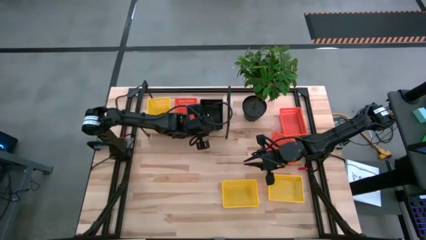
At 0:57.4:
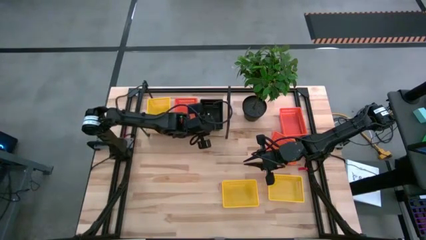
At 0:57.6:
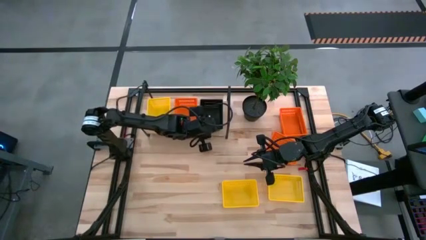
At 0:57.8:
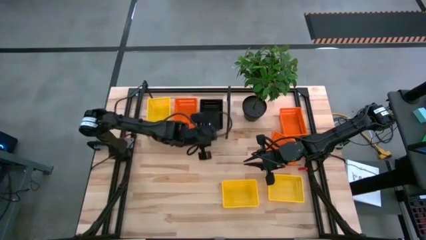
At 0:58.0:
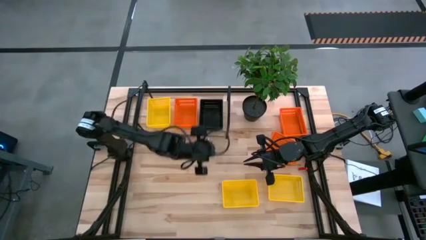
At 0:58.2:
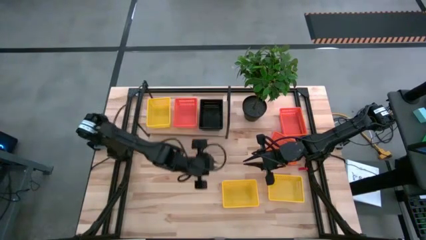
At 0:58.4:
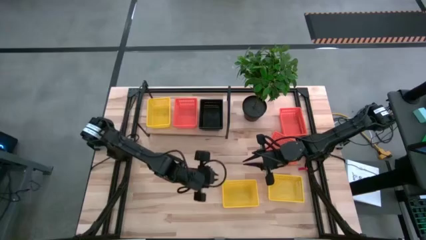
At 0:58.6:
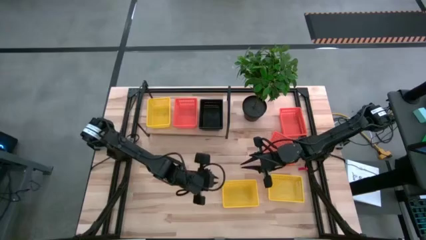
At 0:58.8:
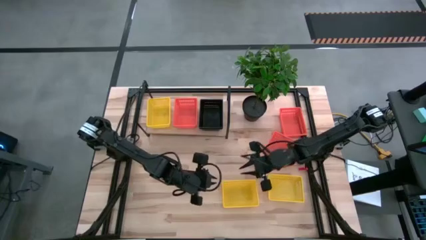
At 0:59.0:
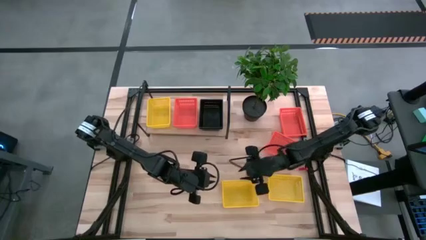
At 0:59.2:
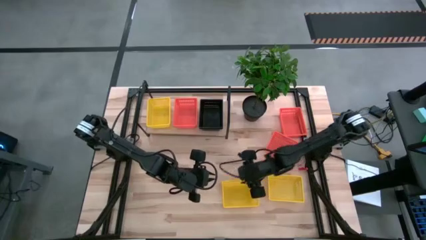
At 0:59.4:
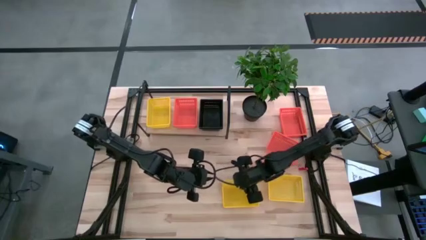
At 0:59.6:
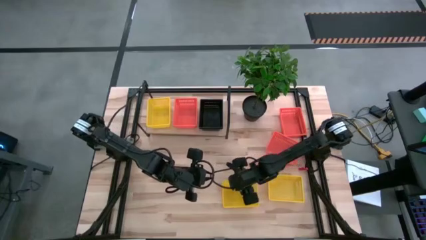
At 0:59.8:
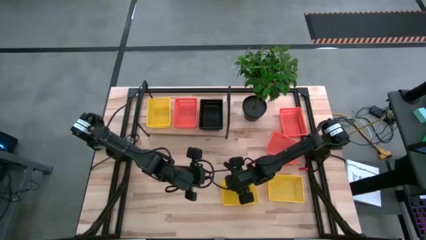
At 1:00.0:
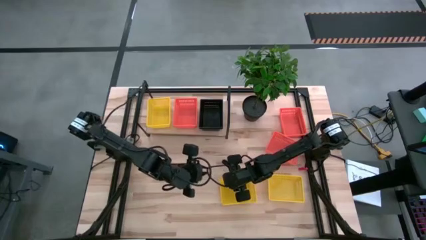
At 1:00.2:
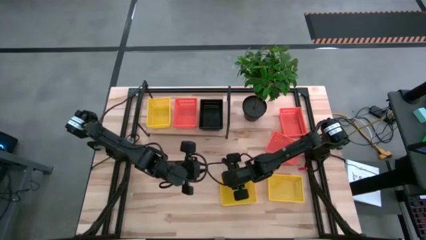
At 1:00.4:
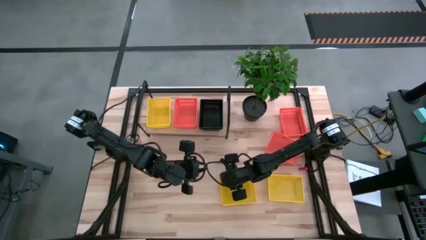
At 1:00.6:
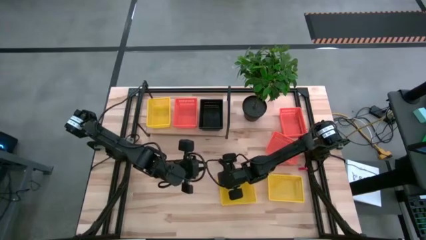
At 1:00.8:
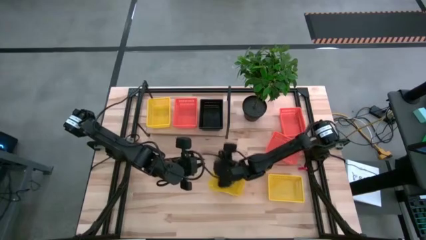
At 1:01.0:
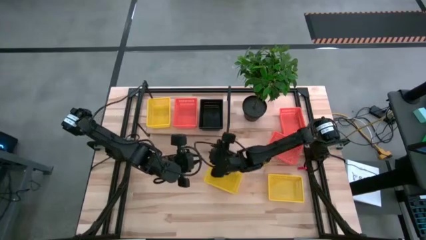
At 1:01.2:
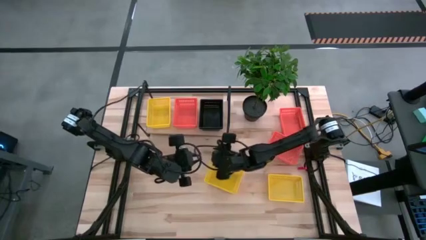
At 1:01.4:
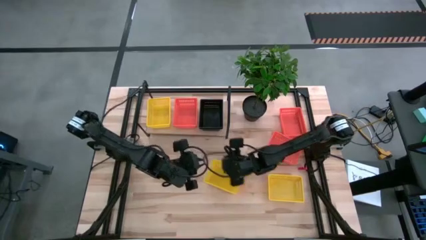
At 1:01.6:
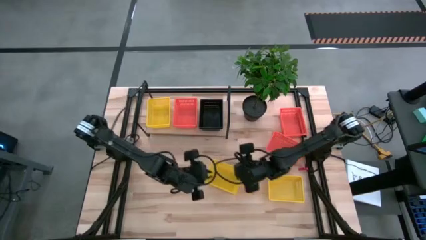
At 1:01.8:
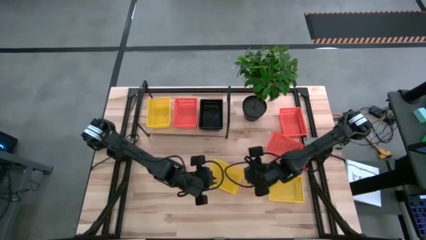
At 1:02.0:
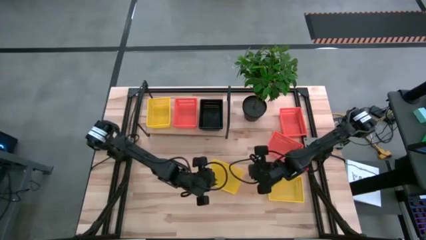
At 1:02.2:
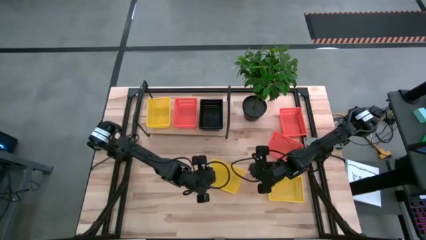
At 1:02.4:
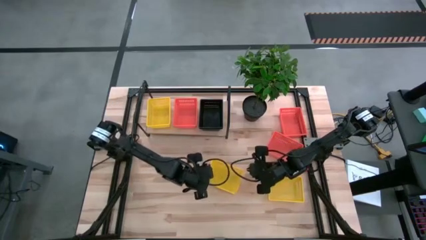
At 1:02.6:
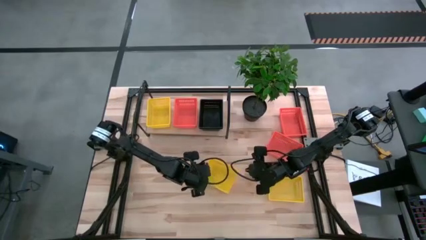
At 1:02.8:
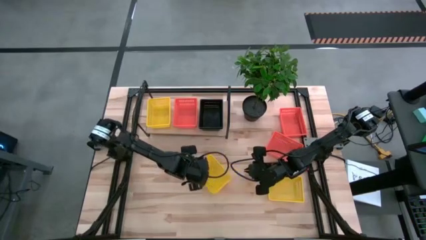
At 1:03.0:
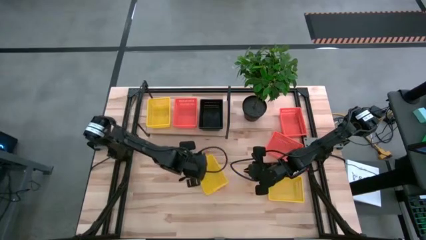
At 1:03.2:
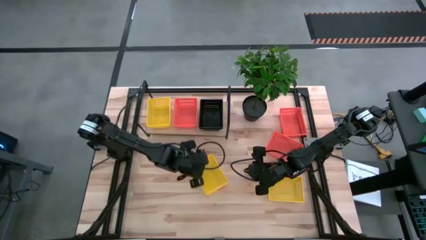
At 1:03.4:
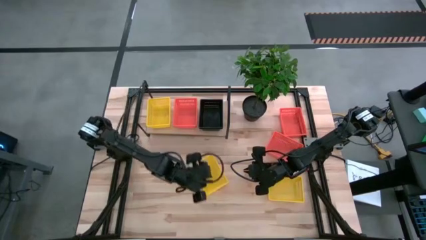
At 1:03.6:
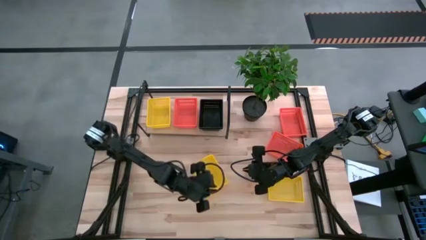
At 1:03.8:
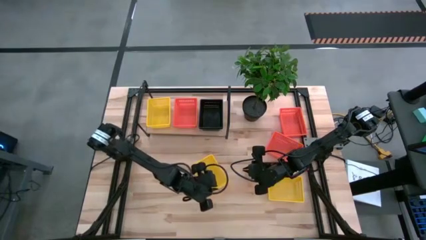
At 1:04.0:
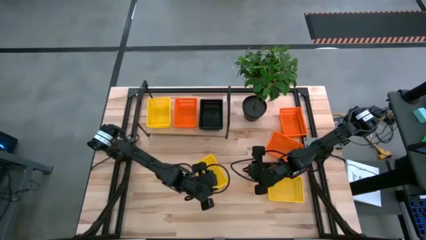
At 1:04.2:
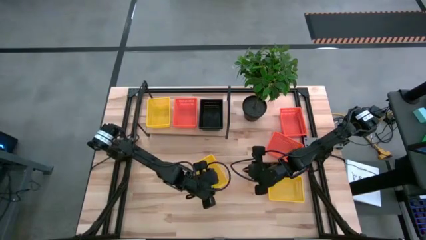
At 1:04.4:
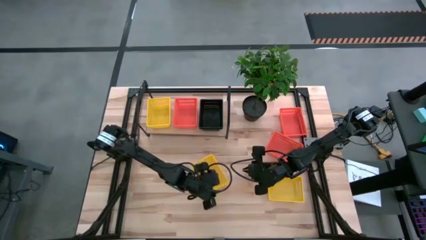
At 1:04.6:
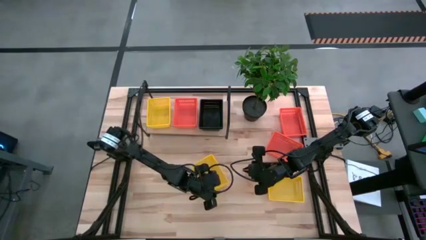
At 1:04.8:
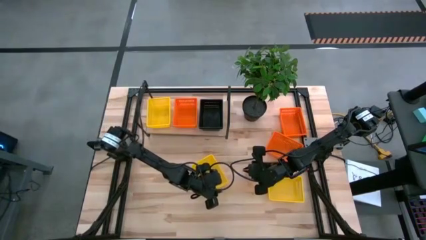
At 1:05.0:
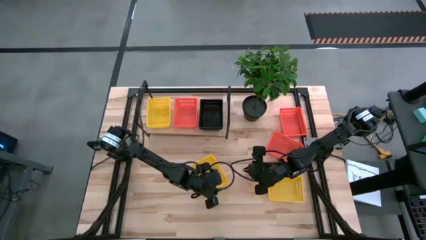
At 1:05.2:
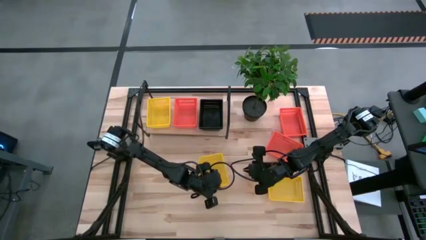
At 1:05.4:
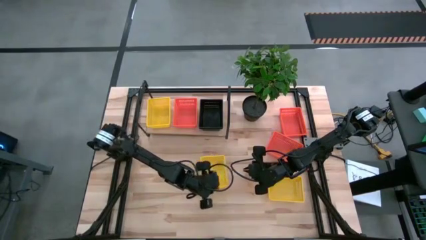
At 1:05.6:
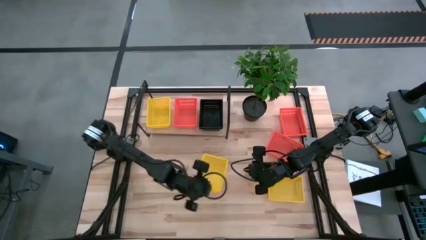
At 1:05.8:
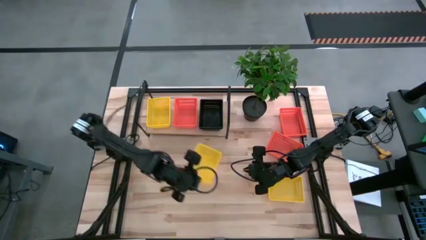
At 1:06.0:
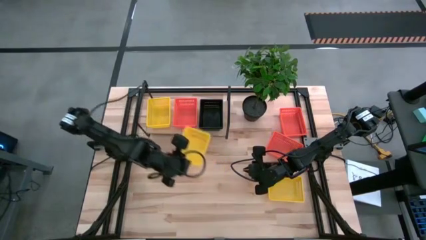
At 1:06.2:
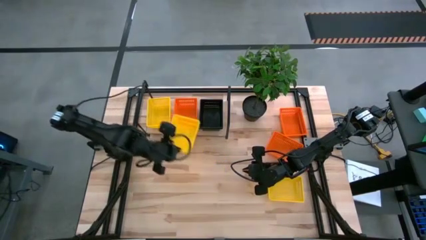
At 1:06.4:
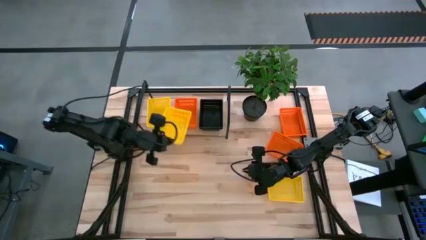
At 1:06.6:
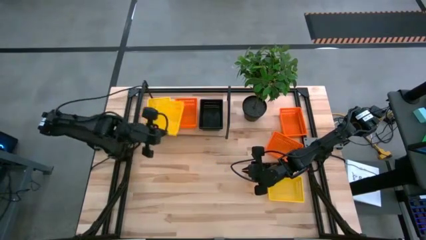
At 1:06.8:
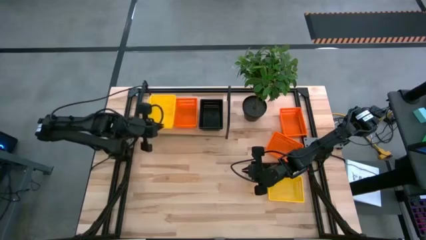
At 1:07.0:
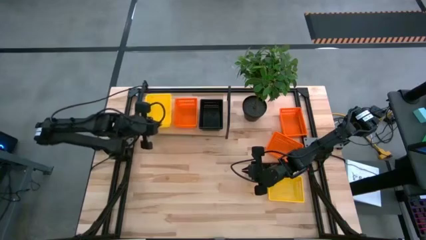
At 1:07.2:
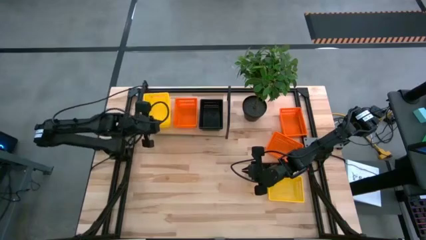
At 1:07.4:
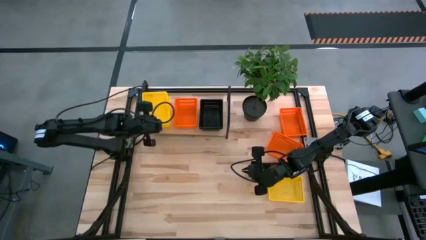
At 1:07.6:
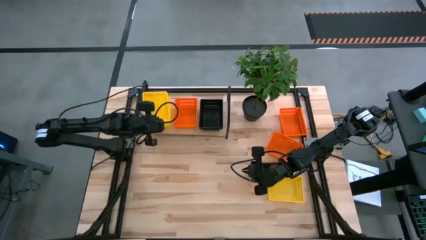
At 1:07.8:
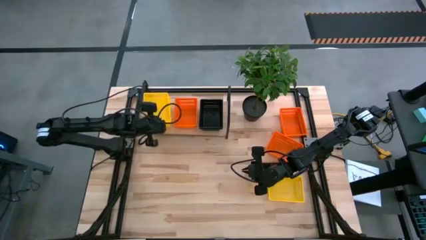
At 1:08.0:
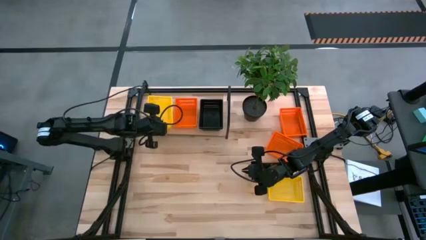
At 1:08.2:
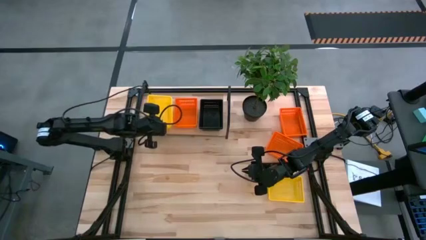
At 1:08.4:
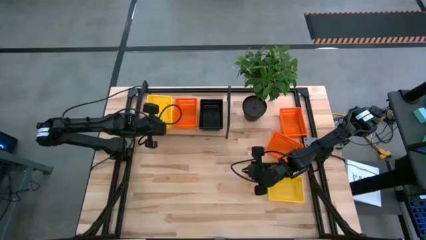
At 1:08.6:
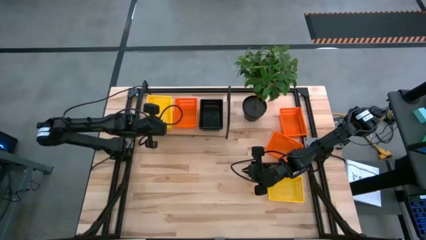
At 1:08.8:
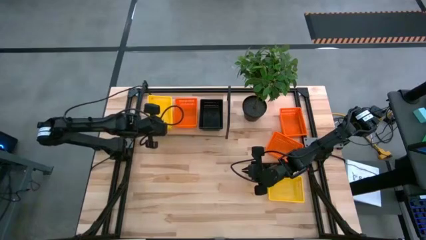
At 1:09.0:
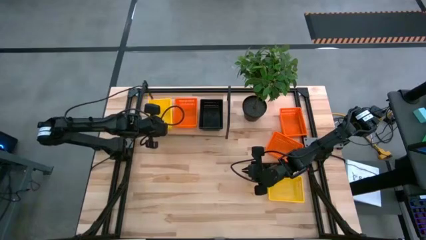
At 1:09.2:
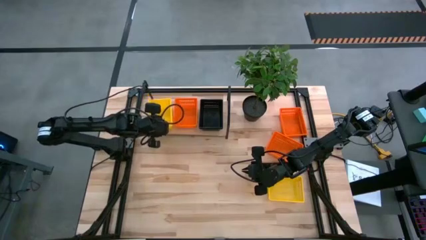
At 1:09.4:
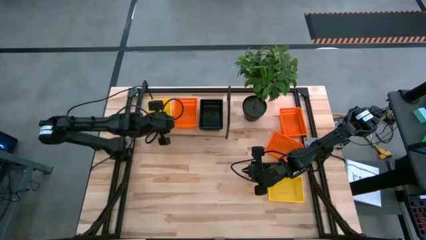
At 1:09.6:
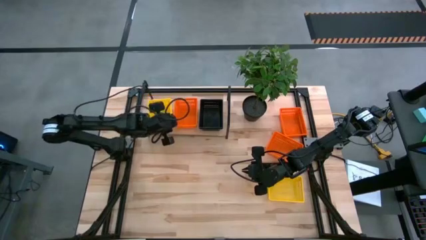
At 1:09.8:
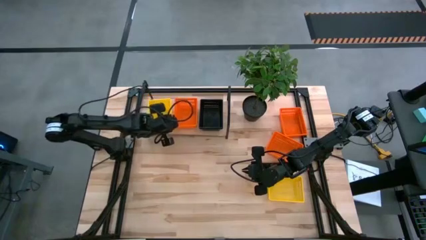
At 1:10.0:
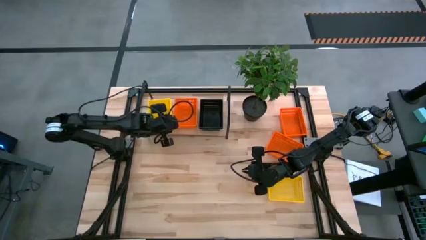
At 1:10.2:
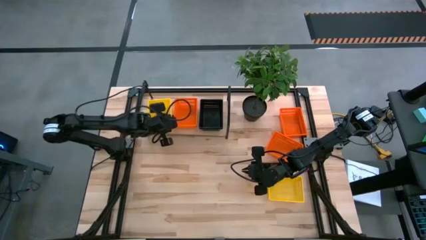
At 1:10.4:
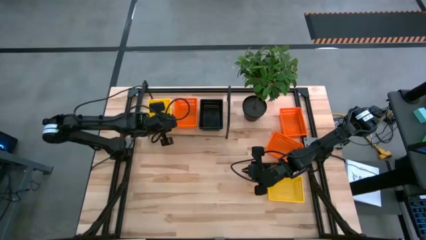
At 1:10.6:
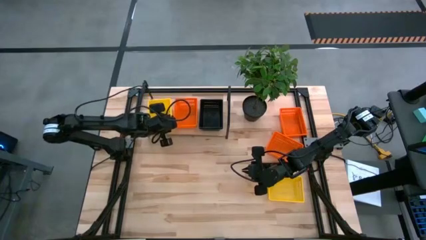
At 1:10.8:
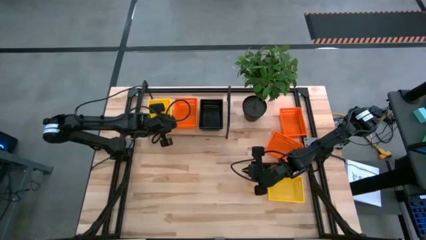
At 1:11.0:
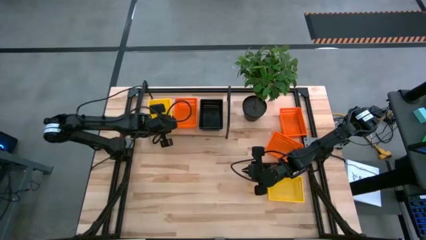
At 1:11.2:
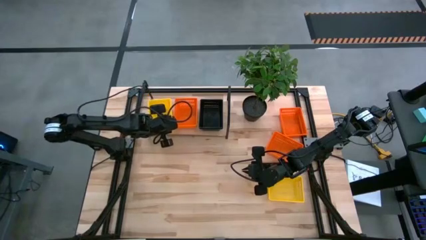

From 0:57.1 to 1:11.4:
Task: Stack baskets on shelf by color
Stack the left yellow basket on the yellow basket on the shelf
